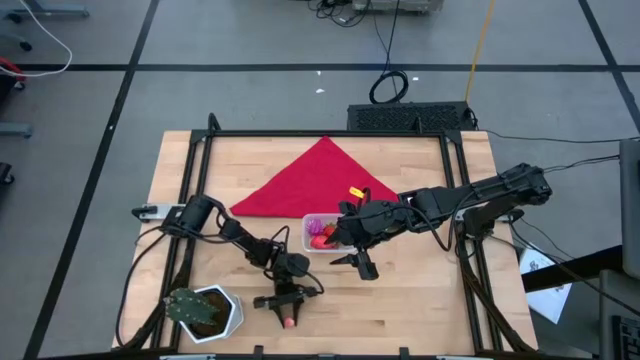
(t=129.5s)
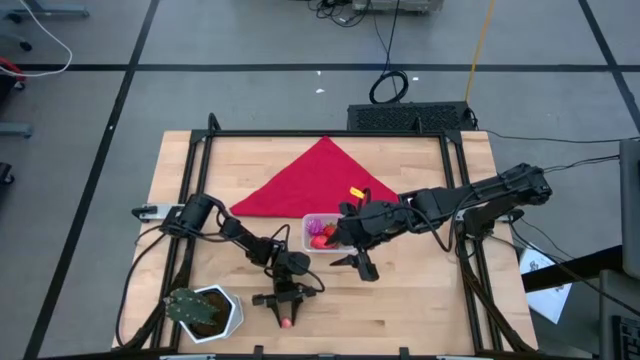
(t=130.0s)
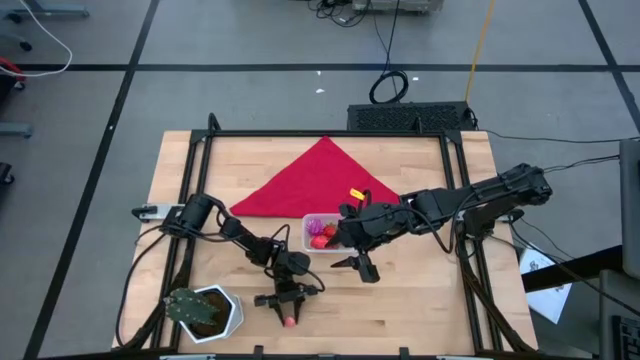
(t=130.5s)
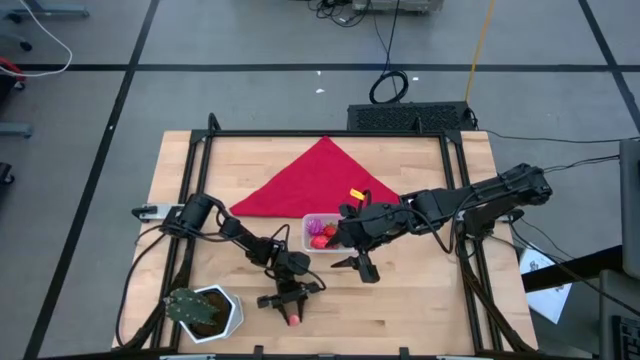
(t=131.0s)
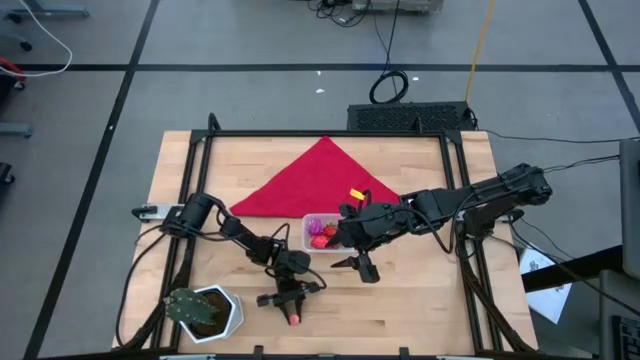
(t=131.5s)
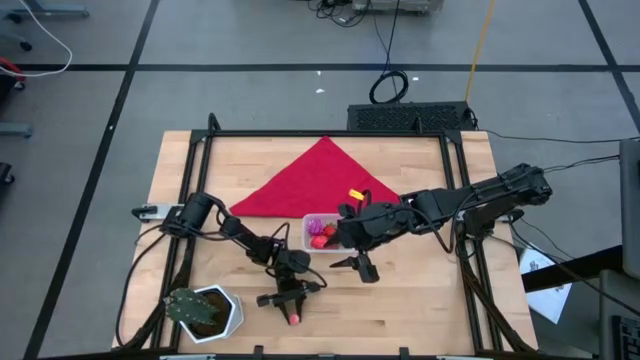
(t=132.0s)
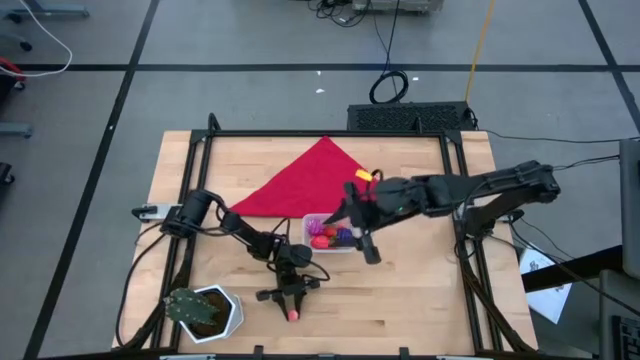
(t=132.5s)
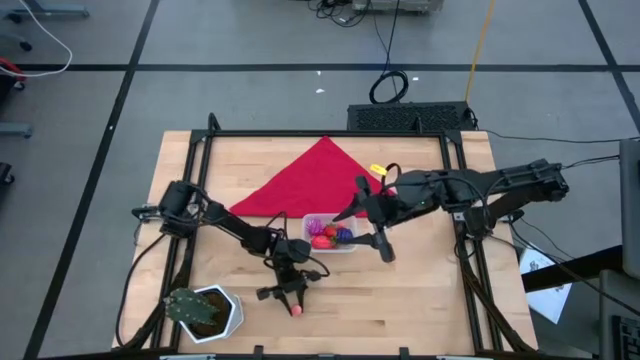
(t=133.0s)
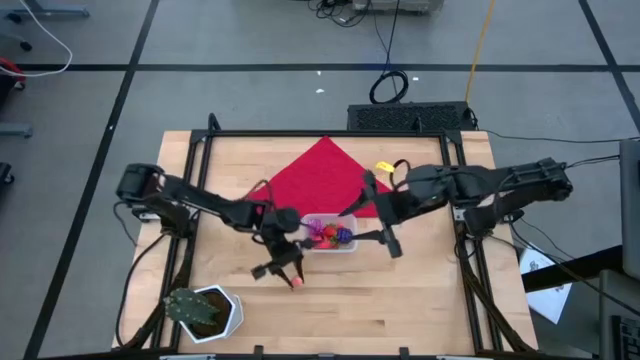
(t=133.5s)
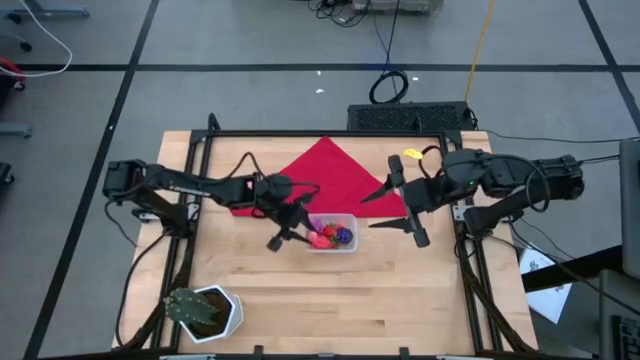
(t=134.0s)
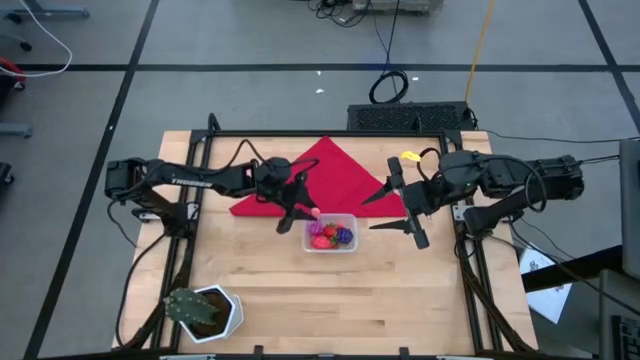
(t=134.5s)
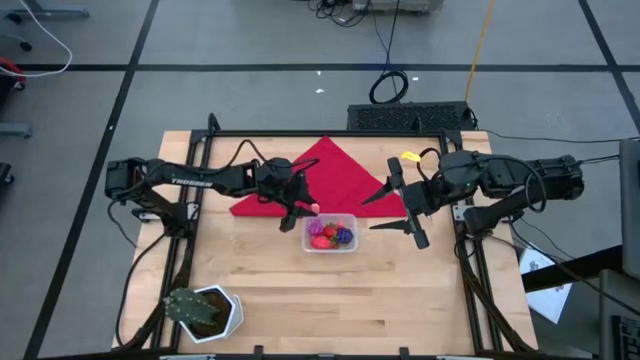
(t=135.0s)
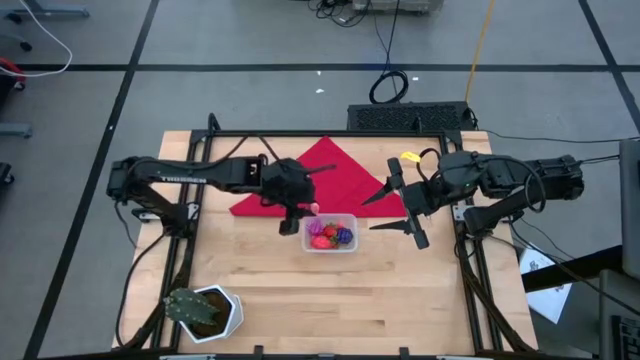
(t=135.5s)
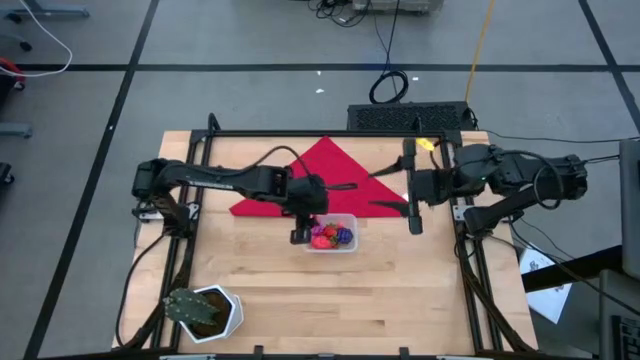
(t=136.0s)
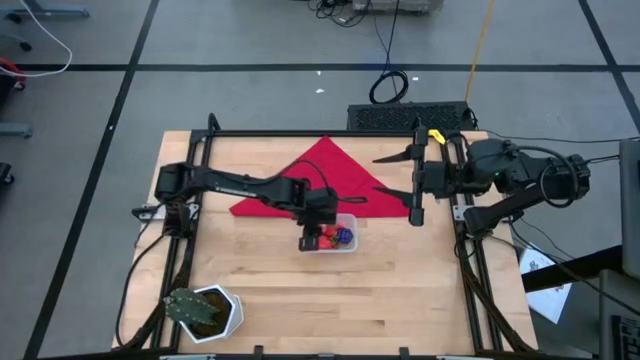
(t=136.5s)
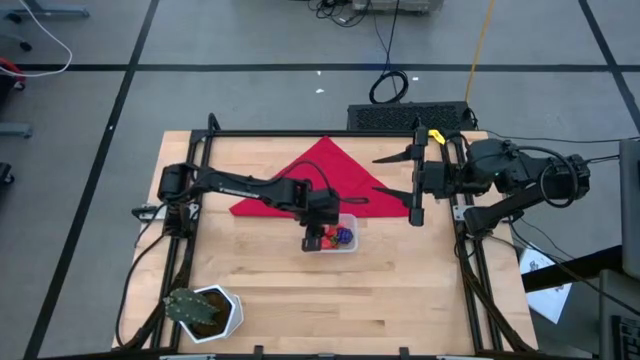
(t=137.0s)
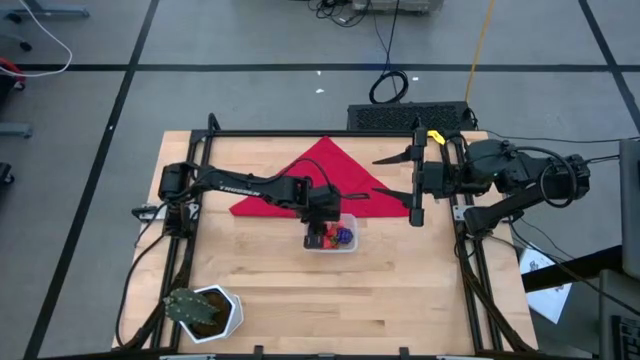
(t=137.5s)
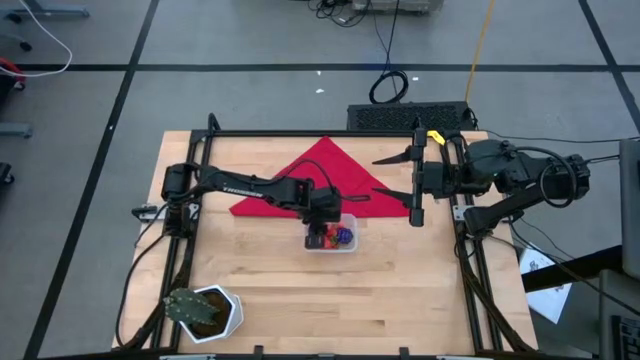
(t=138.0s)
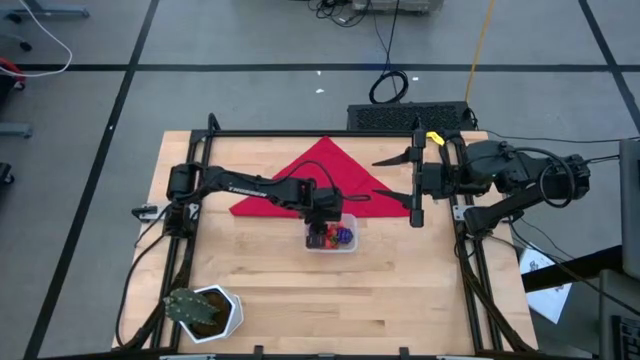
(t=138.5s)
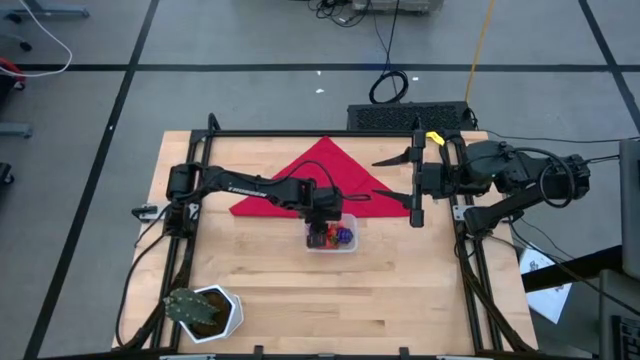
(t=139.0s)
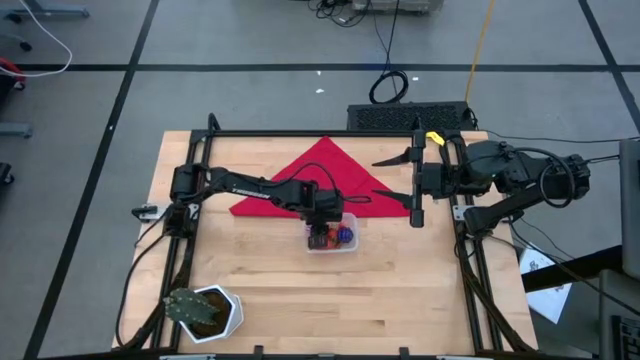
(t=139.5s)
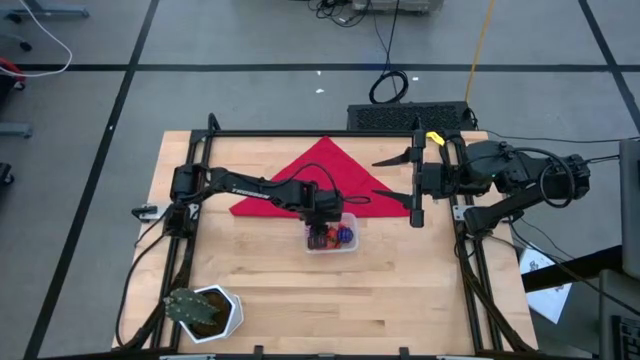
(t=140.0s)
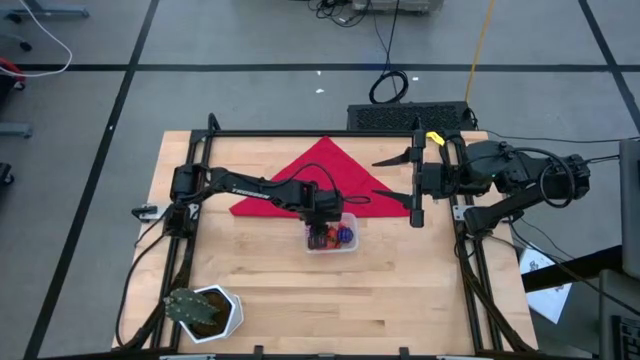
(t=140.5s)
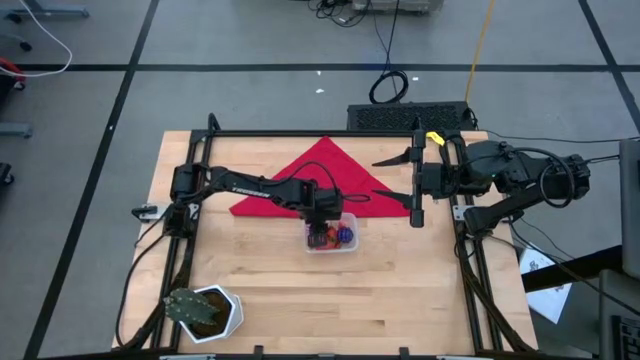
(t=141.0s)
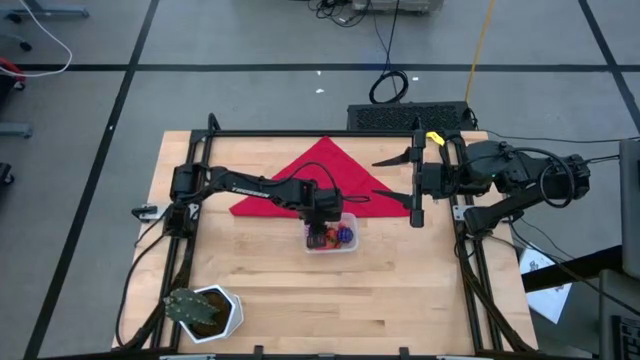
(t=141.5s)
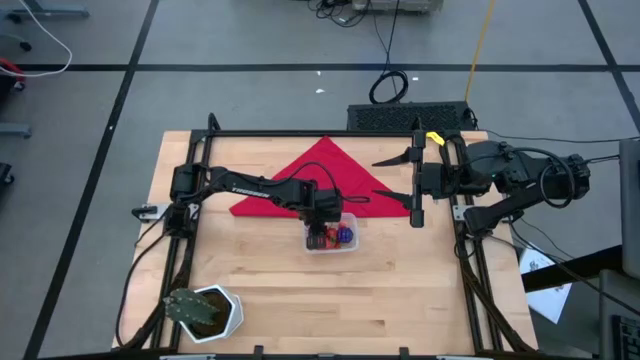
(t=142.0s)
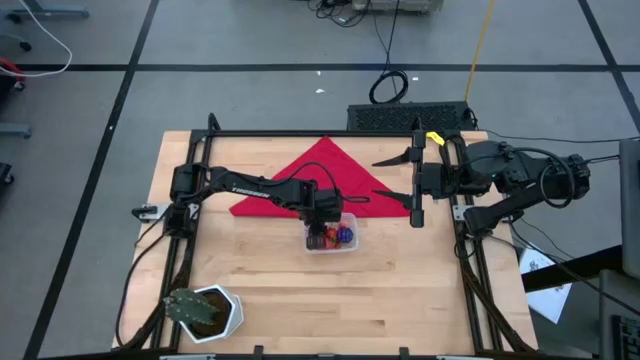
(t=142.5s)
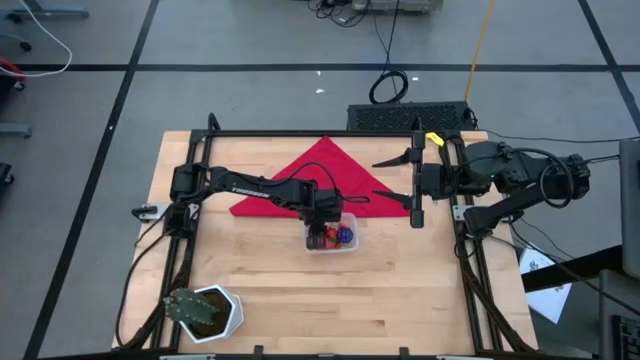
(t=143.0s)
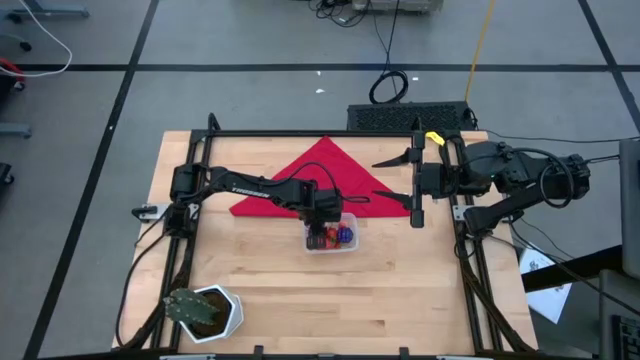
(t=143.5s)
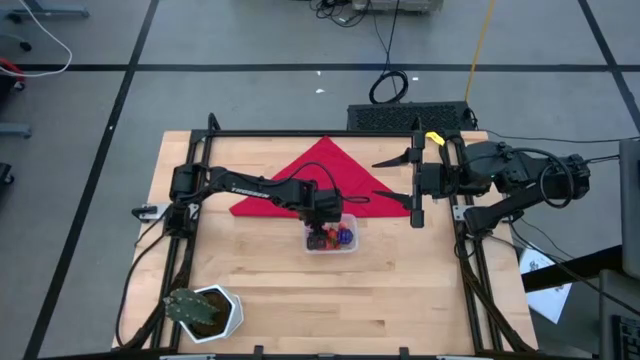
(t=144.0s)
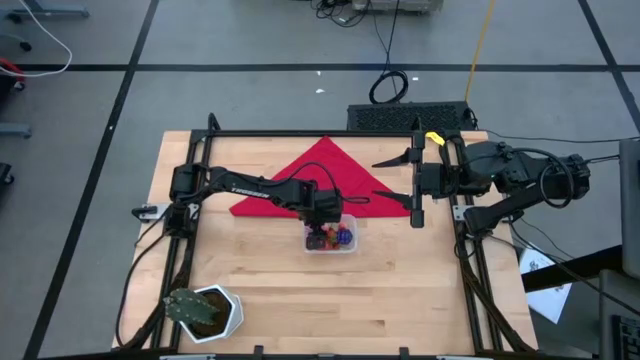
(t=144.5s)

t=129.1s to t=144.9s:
Task: Pick and placing Produce into tupperware
Put the pink peach in the transparent bin

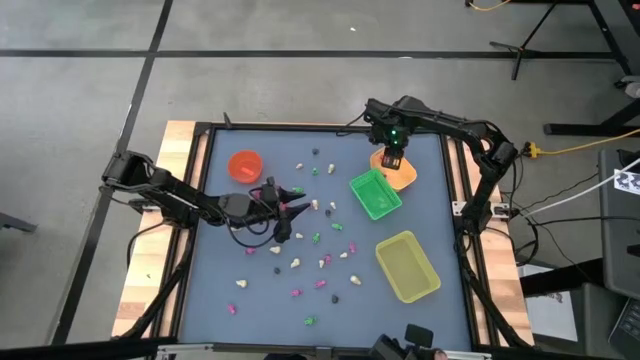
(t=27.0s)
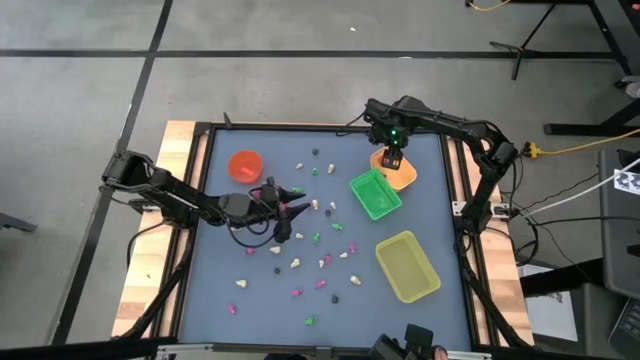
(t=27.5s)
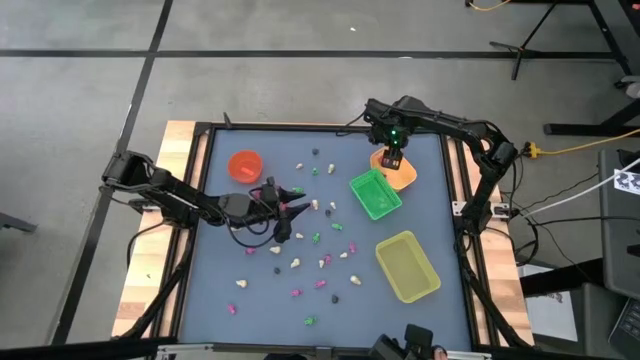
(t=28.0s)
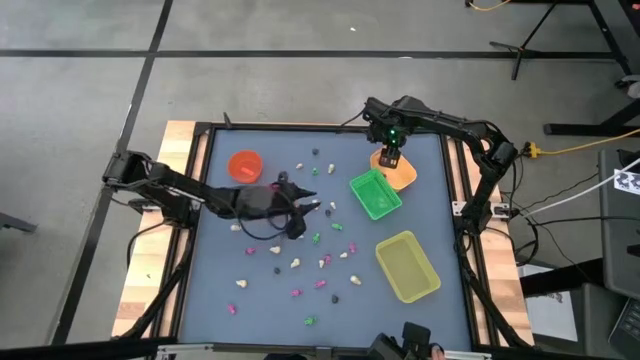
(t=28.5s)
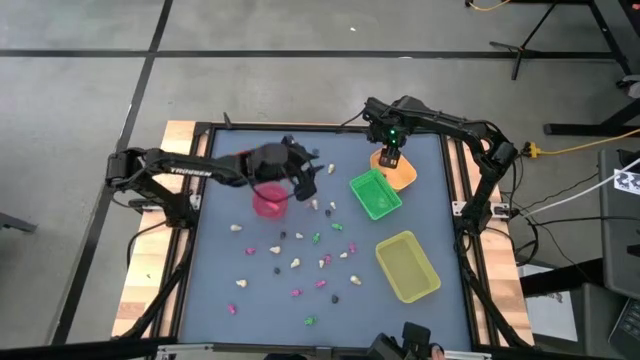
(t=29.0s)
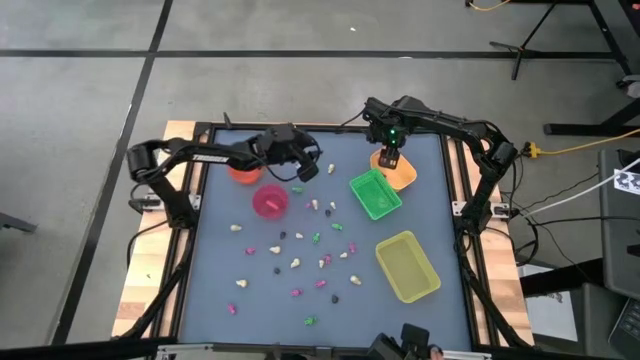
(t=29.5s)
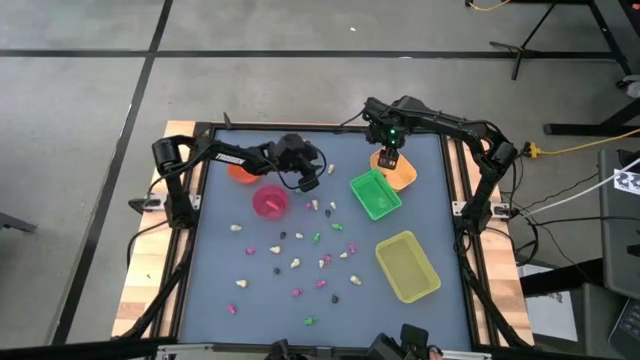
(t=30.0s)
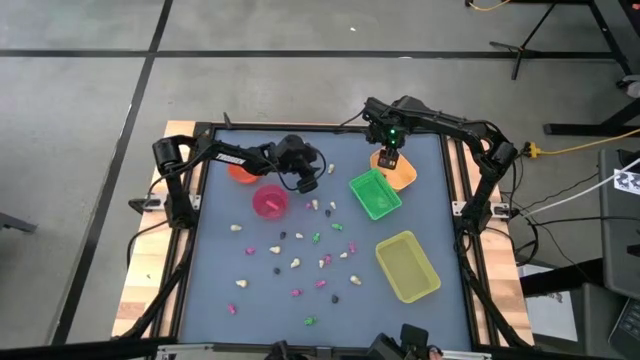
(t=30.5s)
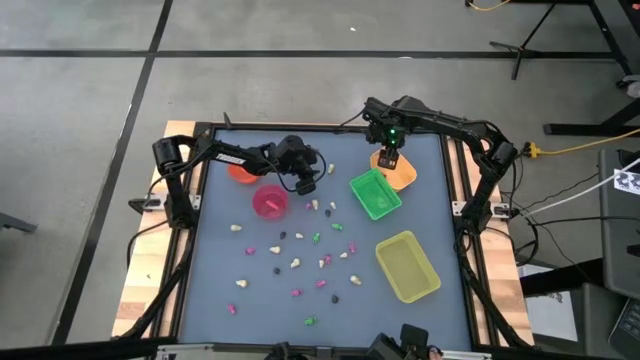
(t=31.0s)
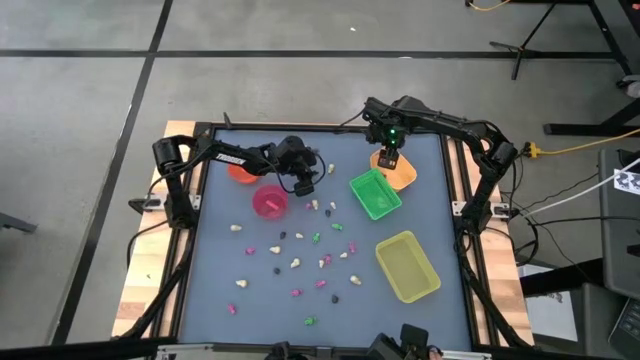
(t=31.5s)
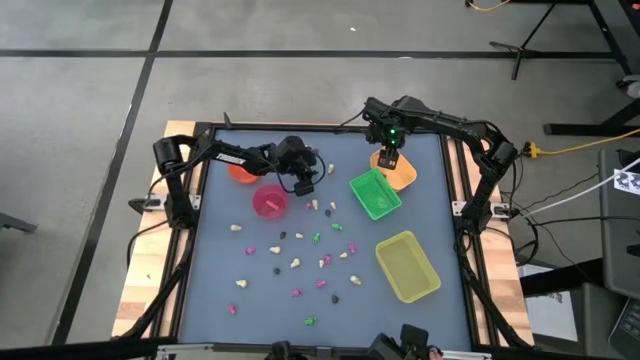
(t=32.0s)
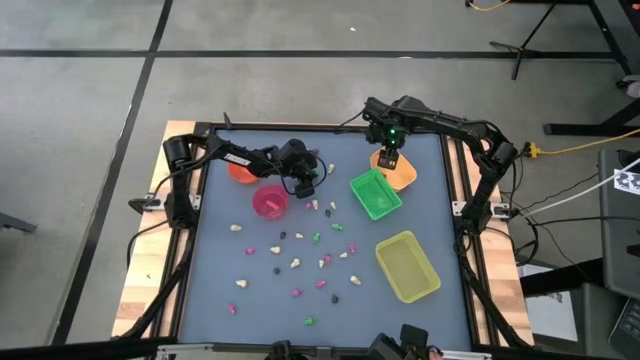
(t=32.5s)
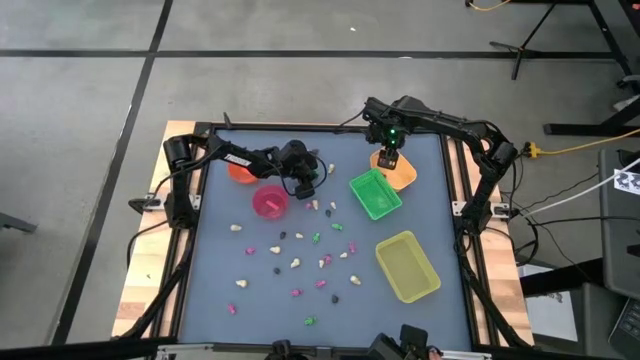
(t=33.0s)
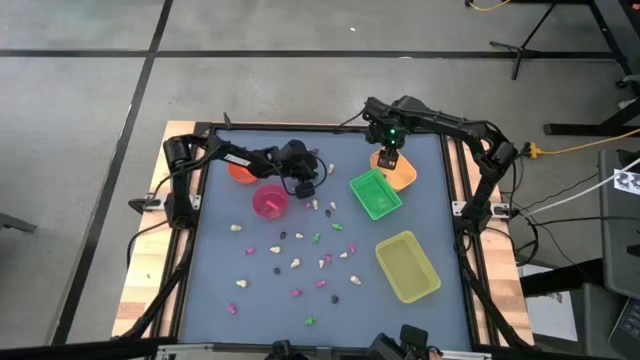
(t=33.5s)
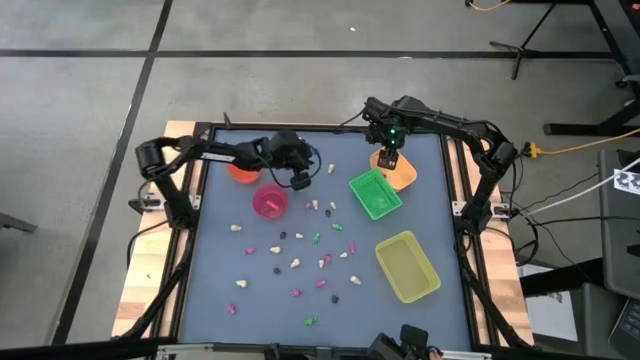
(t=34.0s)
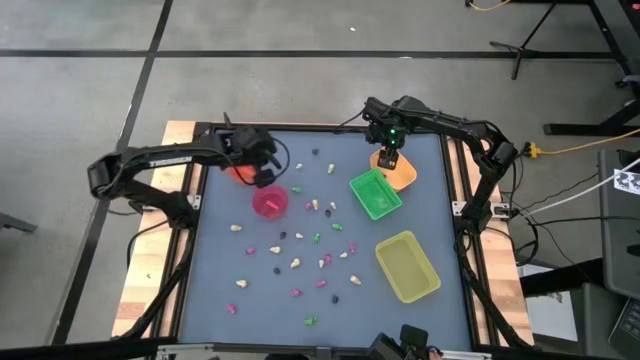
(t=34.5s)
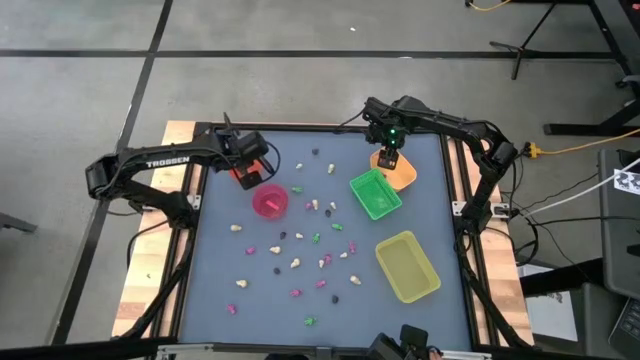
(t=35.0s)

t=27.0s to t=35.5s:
Task: Sort Halloween decoration
Put the green skeleton toy into the orange bin
